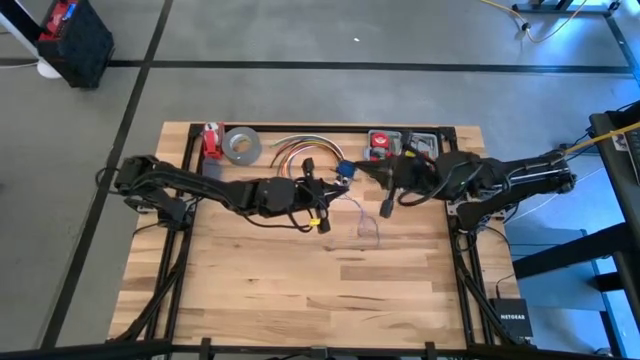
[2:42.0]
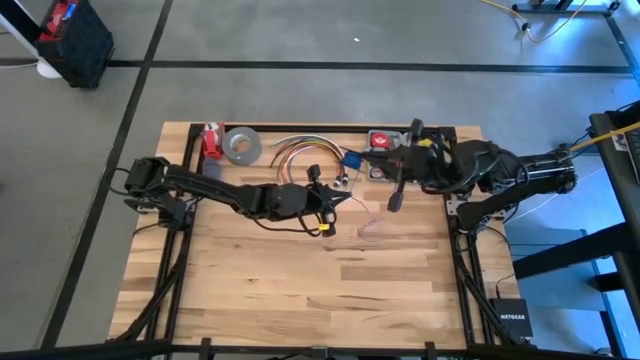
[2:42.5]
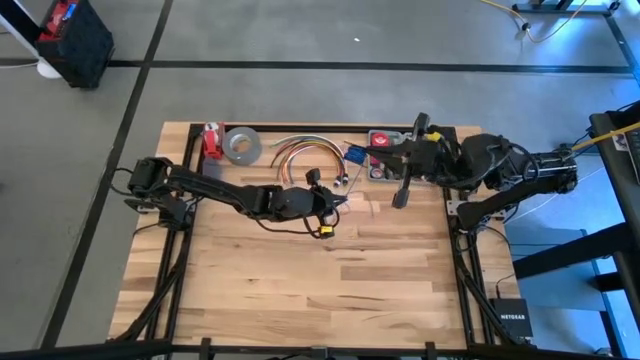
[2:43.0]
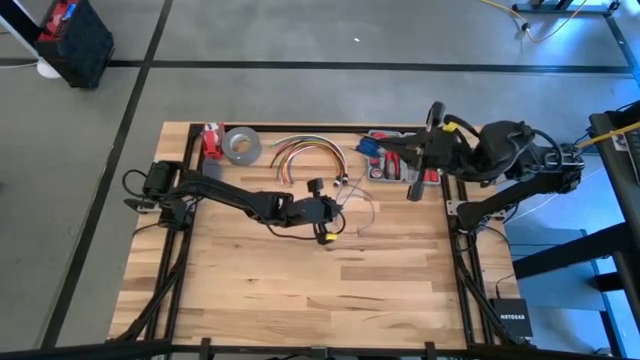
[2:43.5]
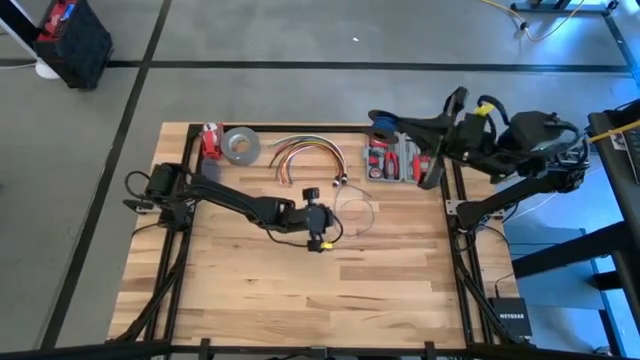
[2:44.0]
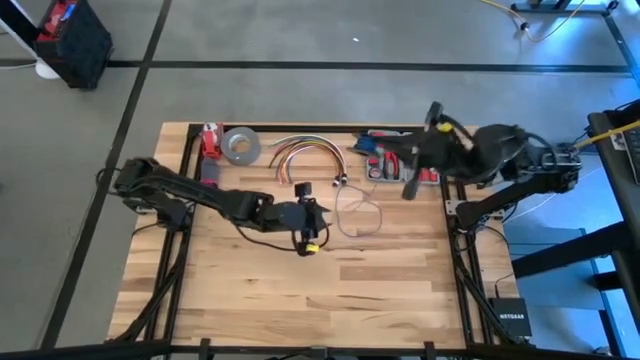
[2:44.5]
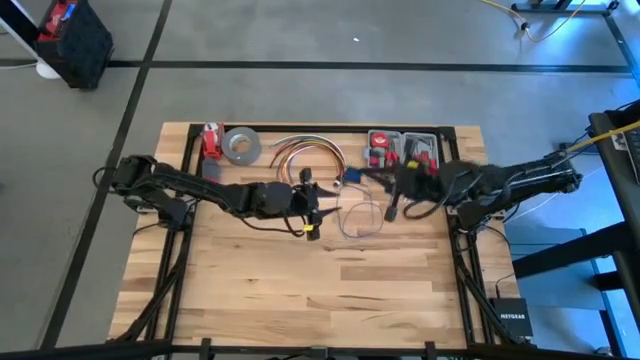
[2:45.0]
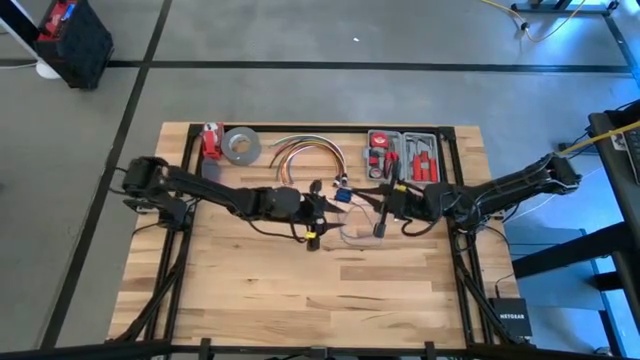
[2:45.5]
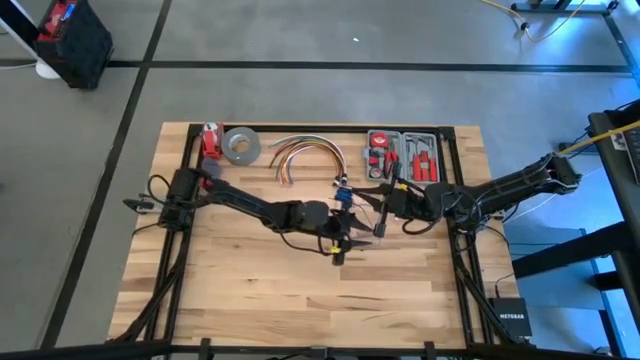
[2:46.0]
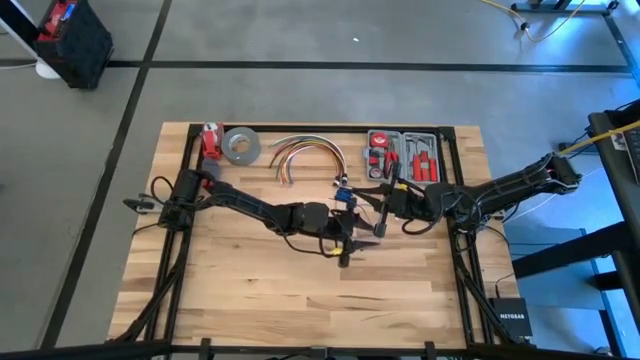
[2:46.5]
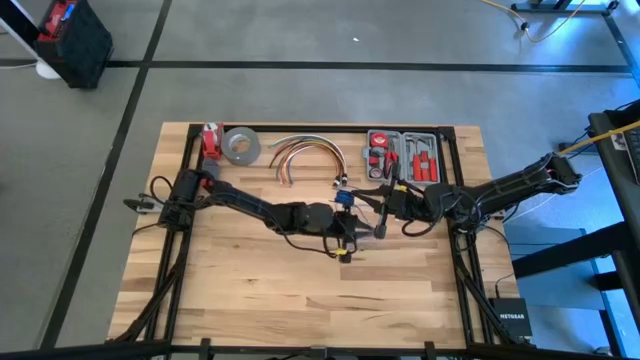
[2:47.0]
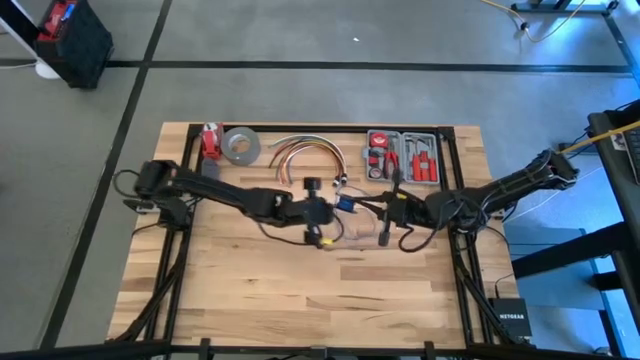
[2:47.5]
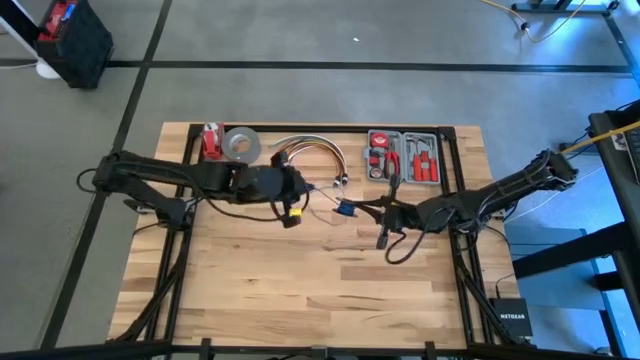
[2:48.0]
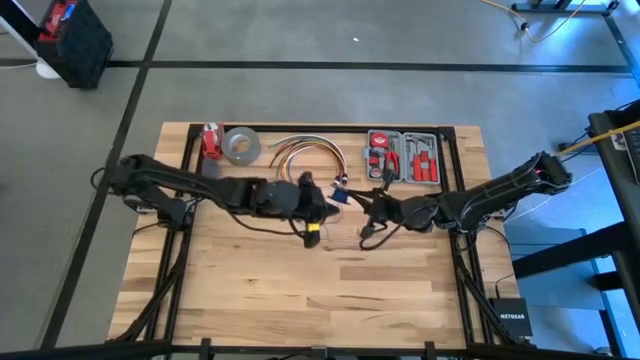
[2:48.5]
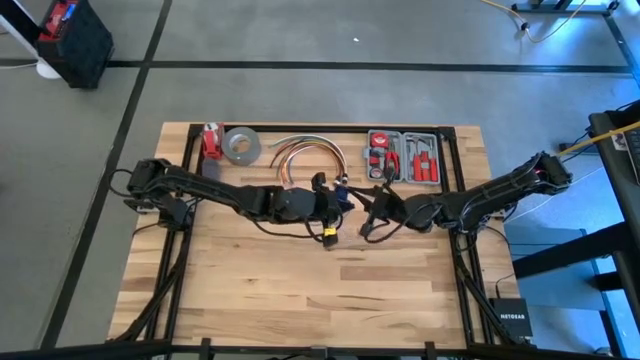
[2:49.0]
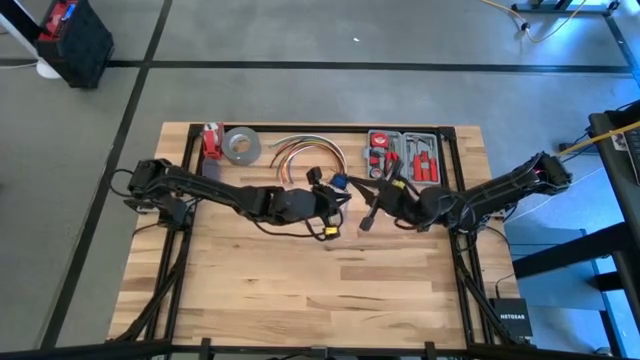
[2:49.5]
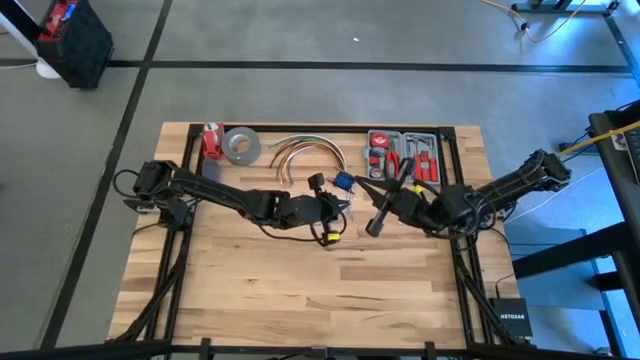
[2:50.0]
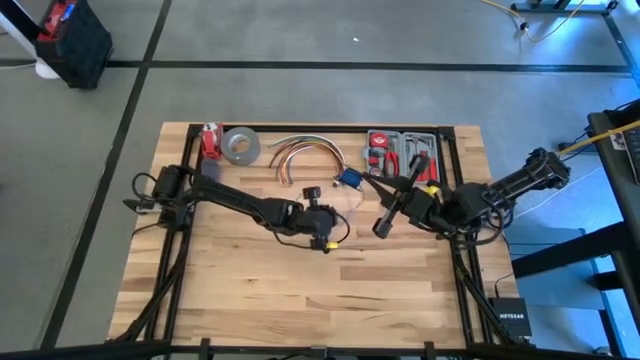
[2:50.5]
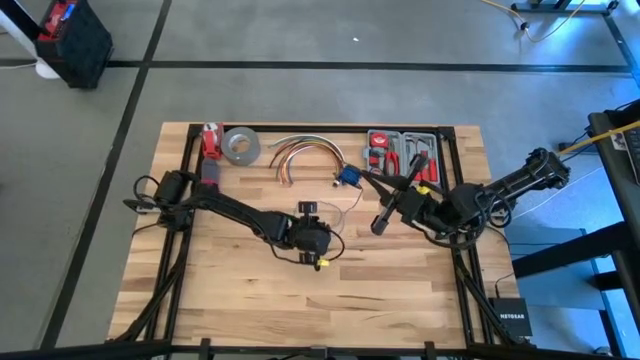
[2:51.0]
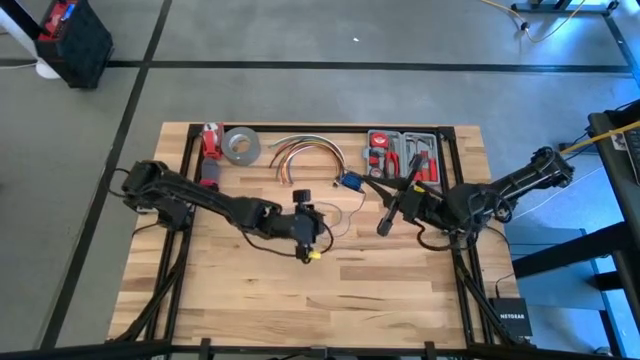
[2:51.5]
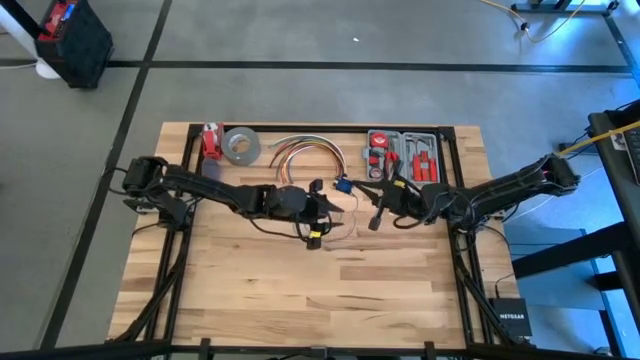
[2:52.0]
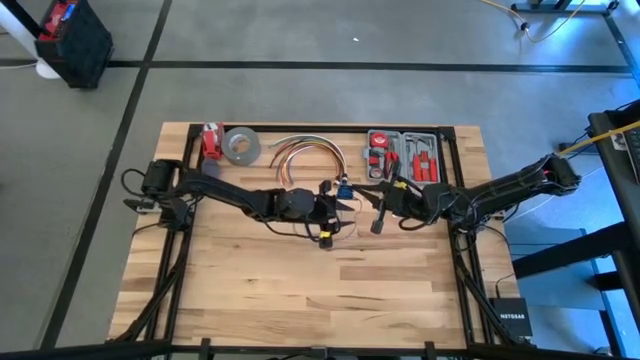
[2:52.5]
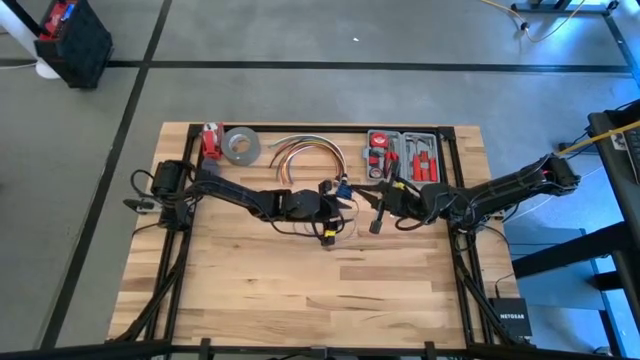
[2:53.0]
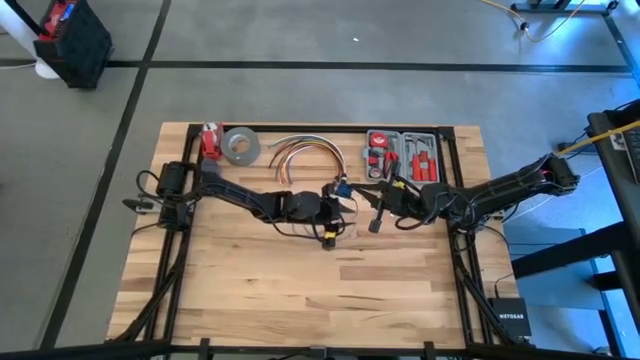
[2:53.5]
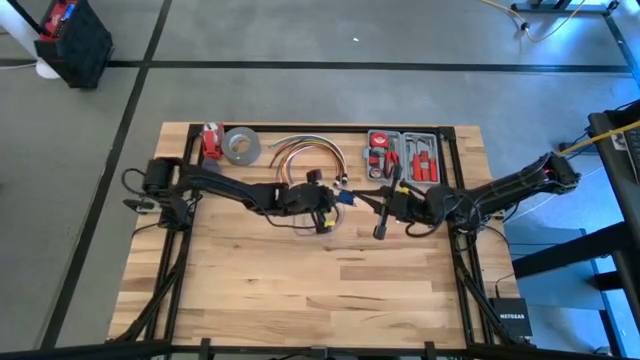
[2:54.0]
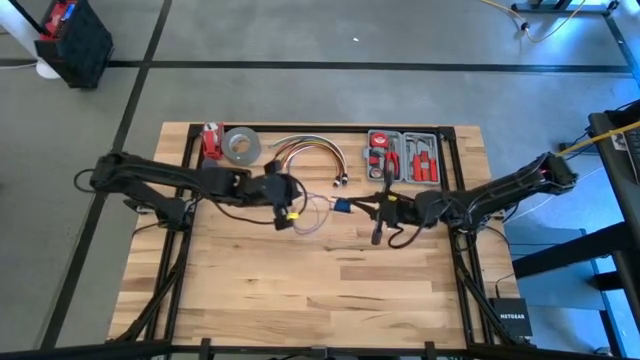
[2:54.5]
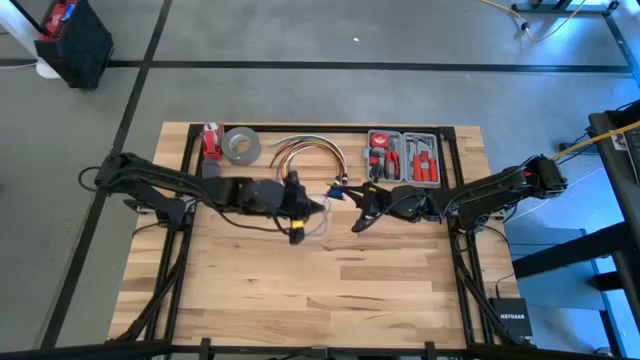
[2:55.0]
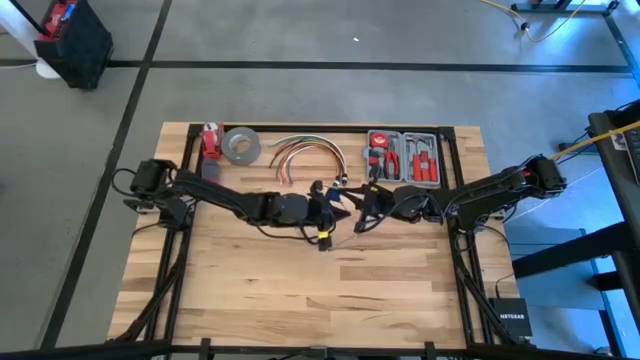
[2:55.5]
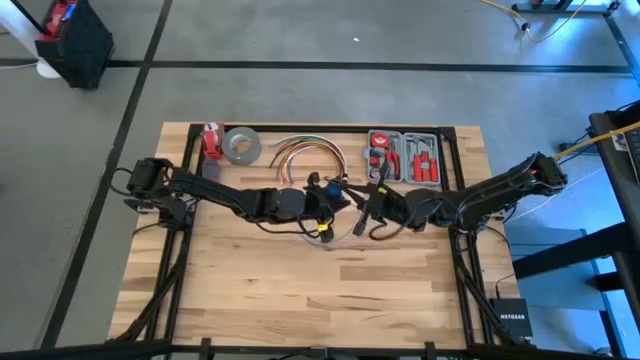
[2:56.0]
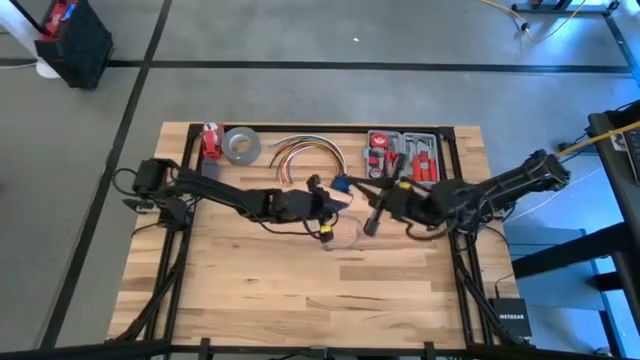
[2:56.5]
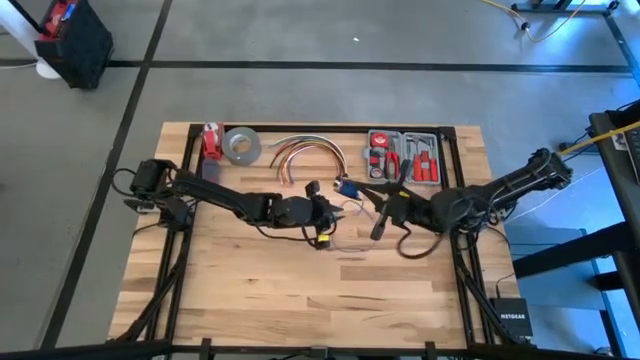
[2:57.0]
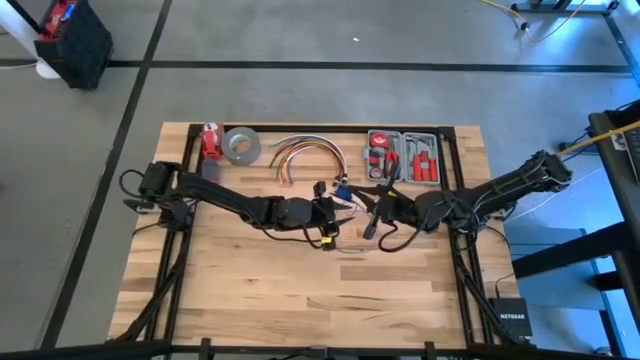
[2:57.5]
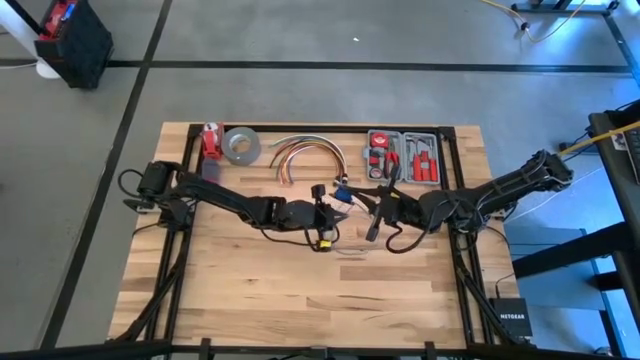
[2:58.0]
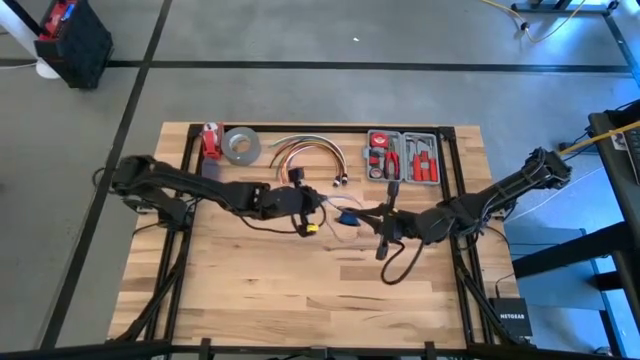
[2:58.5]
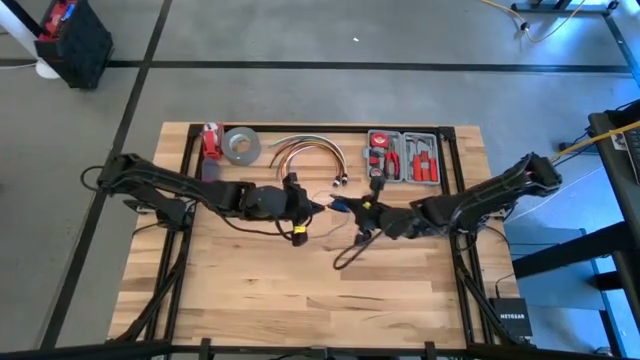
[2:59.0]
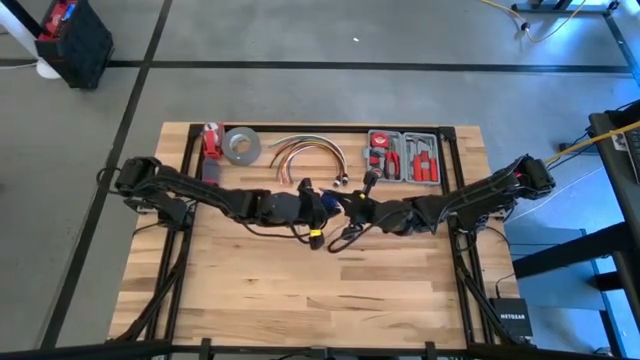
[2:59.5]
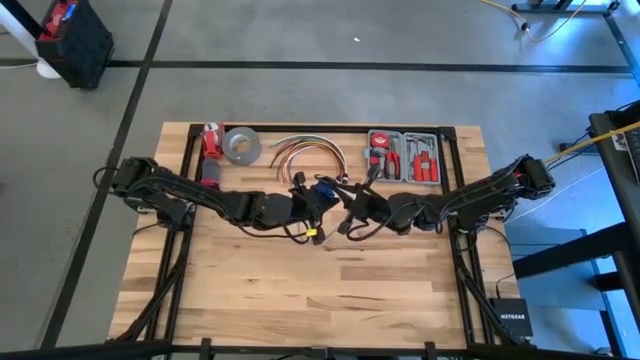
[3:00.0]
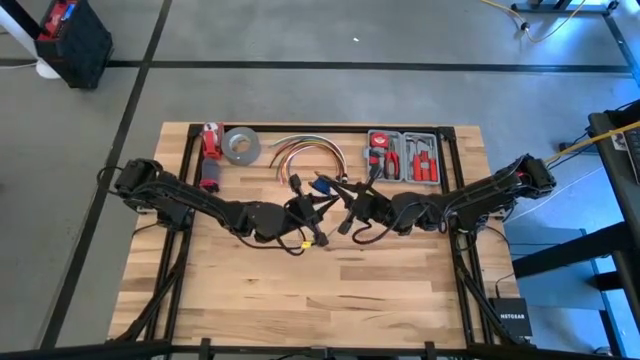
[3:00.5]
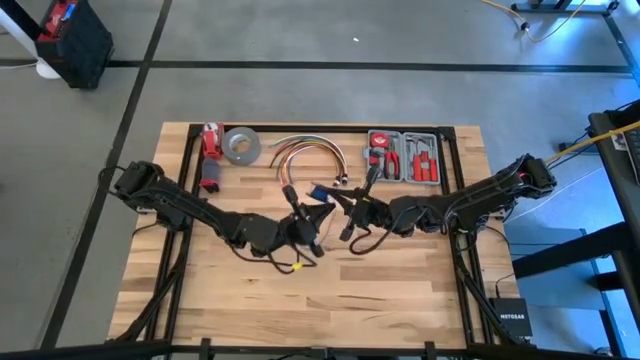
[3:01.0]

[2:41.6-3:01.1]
Task: Coil cords
Coil the blue wire on the black spool

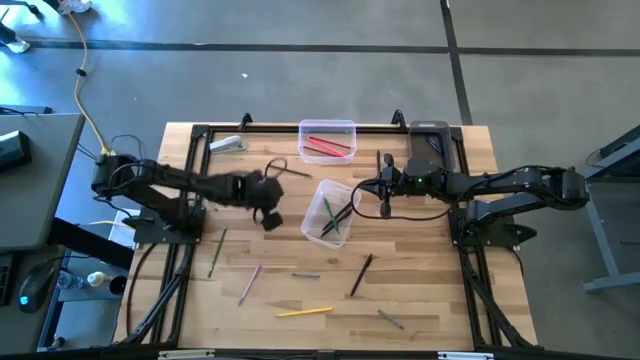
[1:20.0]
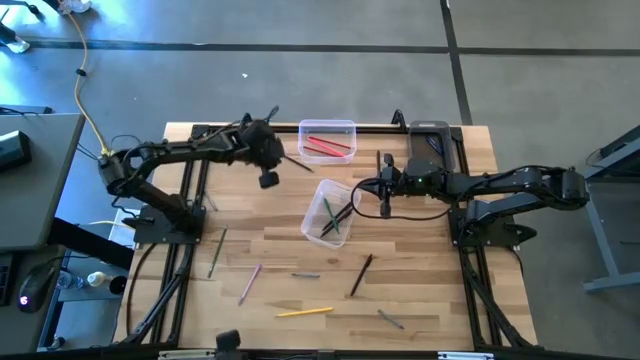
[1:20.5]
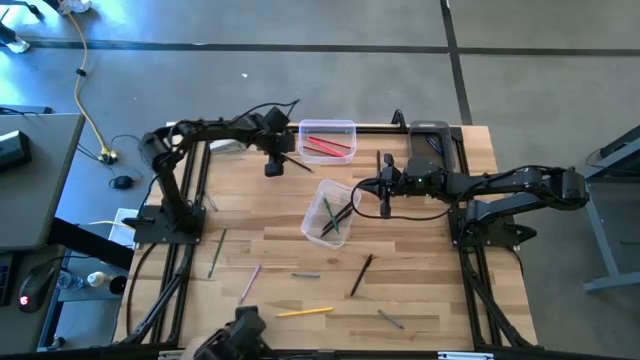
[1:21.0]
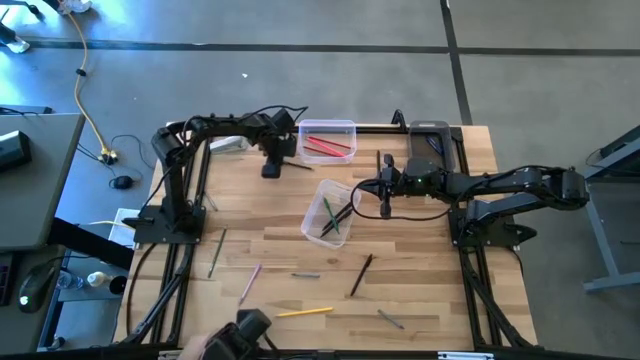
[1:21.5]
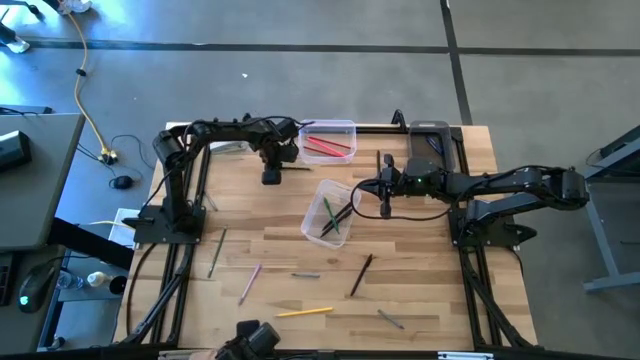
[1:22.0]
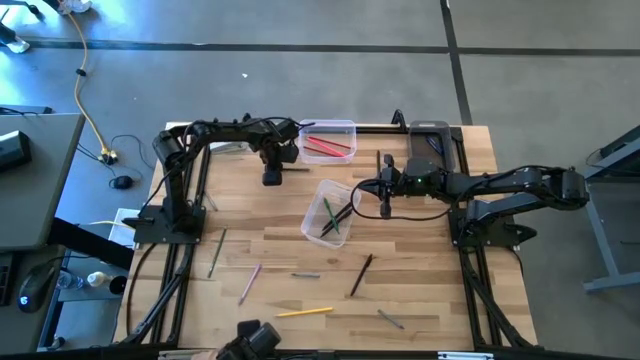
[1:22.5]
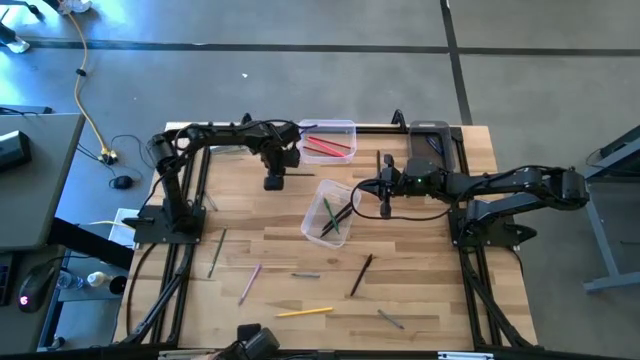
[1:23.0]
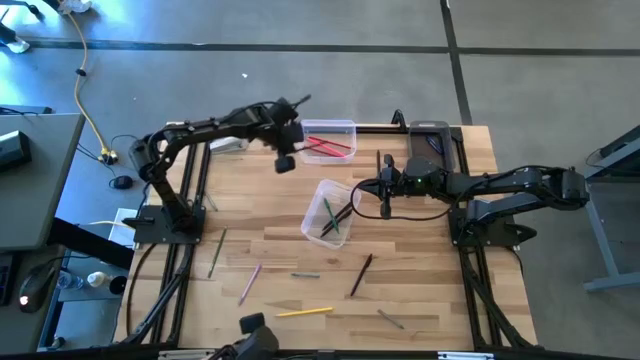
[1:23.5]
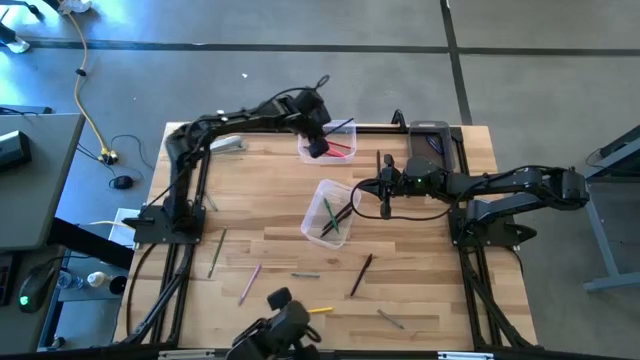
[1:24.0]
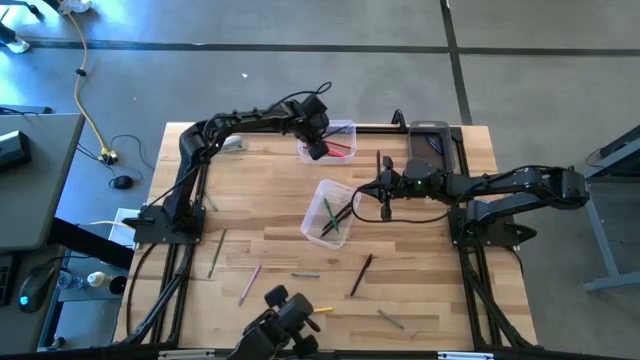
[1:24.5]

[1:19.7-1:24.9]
Task: Sort crayons/erasers/pens/pencils in bins
Put the blue color pencil into the top transparent bin
